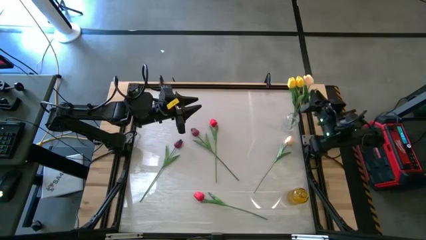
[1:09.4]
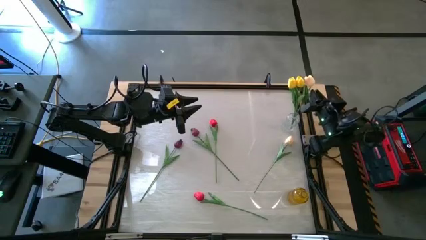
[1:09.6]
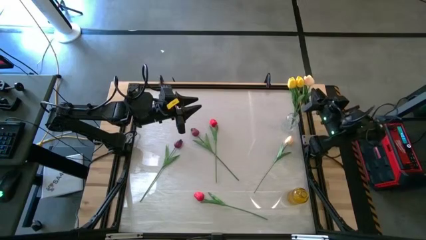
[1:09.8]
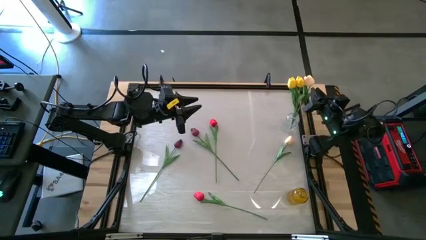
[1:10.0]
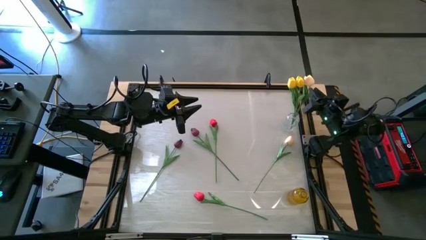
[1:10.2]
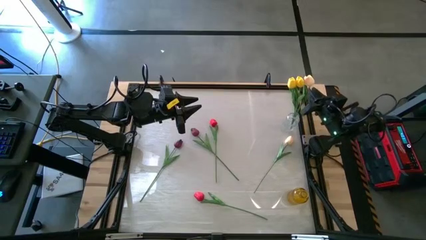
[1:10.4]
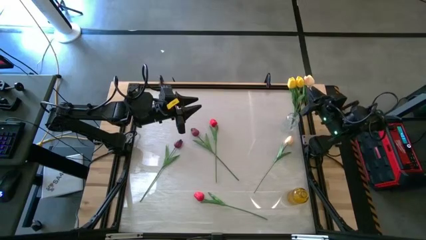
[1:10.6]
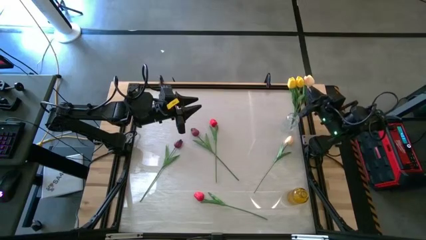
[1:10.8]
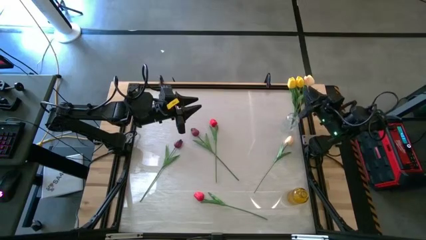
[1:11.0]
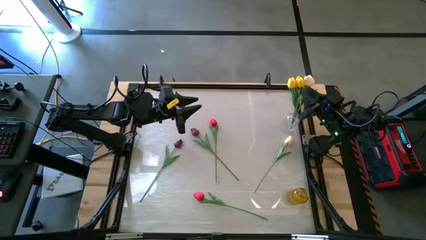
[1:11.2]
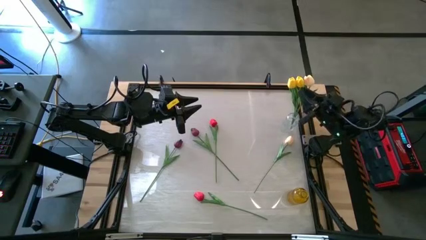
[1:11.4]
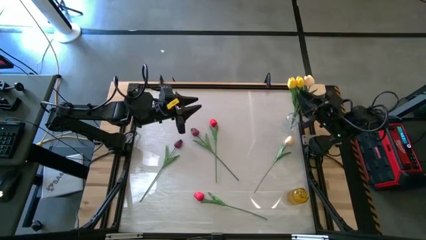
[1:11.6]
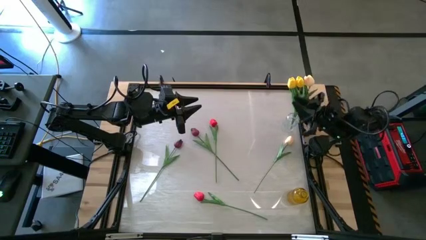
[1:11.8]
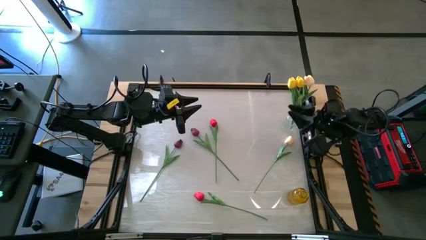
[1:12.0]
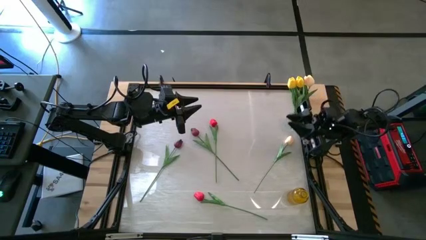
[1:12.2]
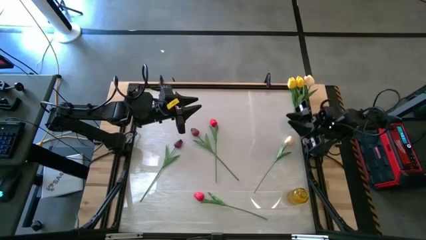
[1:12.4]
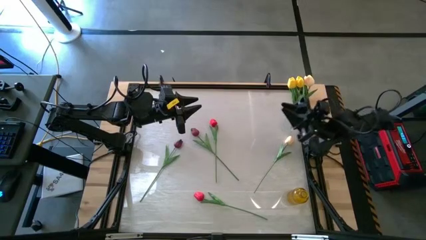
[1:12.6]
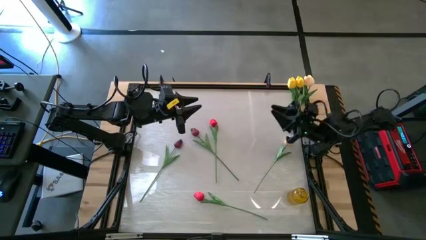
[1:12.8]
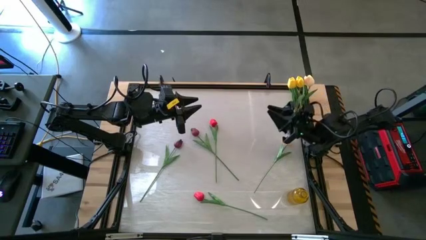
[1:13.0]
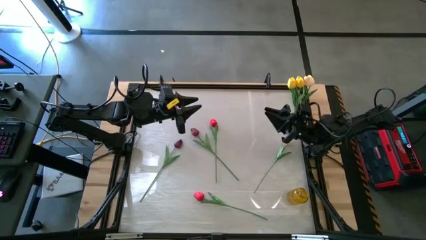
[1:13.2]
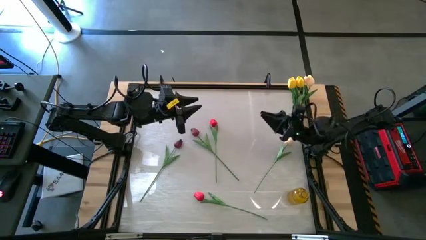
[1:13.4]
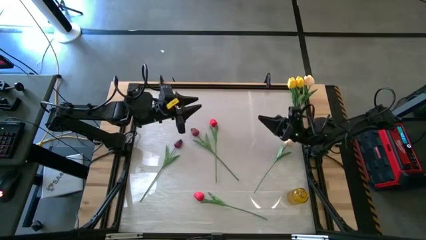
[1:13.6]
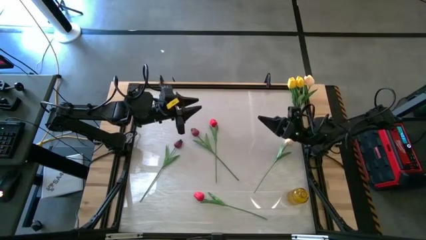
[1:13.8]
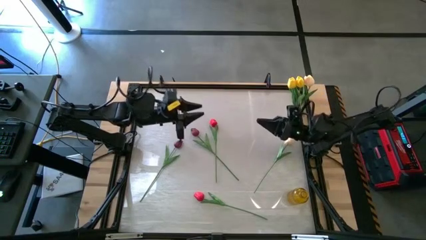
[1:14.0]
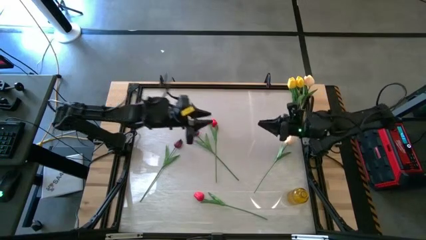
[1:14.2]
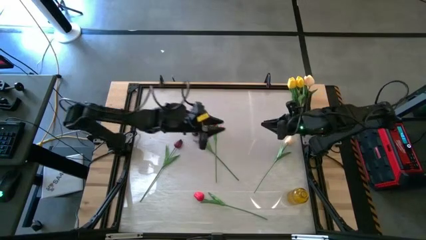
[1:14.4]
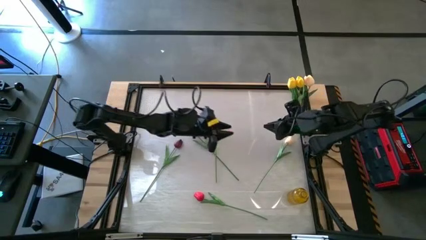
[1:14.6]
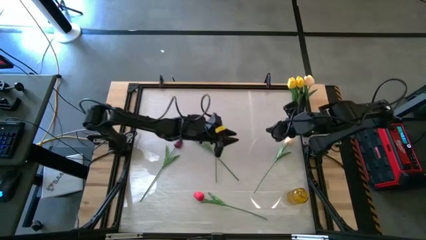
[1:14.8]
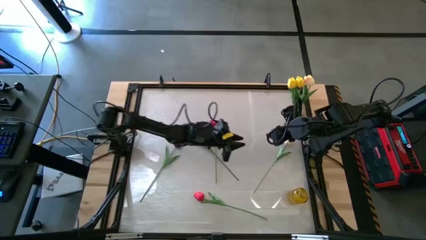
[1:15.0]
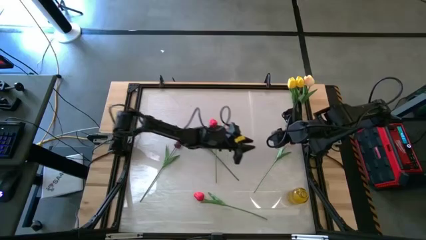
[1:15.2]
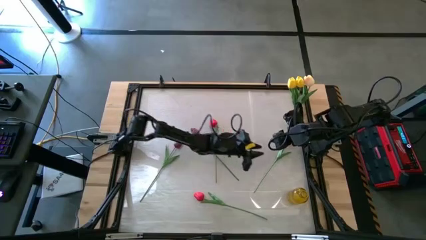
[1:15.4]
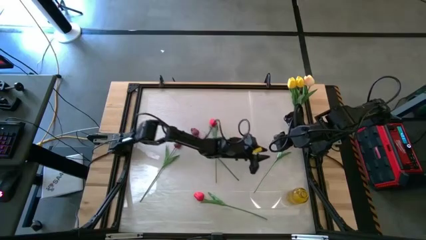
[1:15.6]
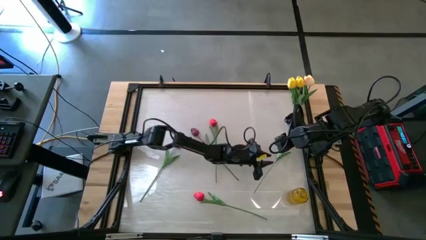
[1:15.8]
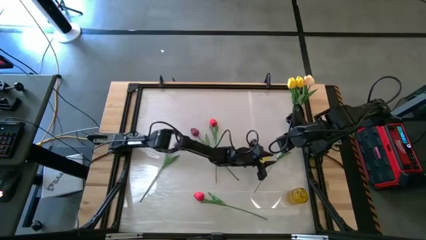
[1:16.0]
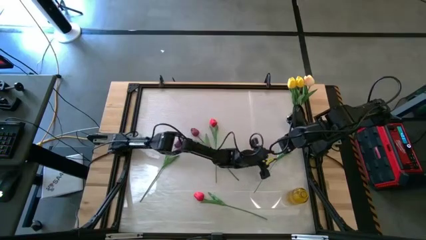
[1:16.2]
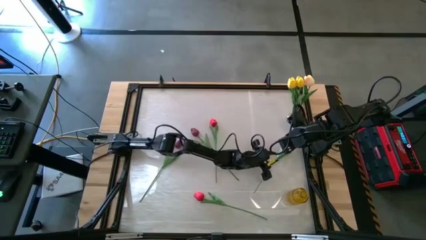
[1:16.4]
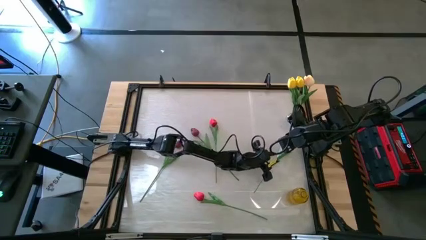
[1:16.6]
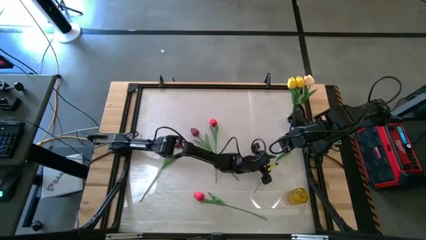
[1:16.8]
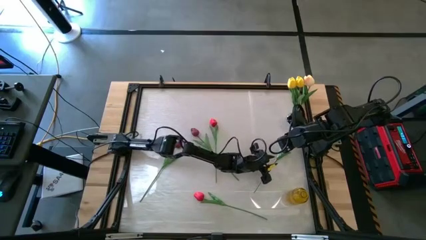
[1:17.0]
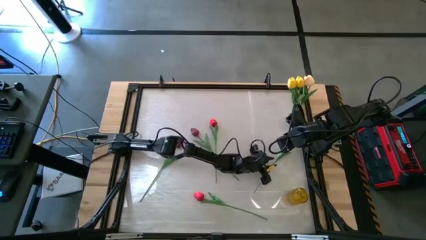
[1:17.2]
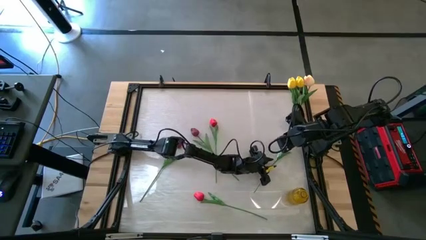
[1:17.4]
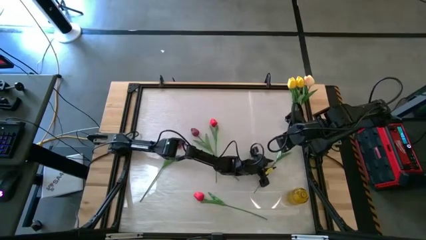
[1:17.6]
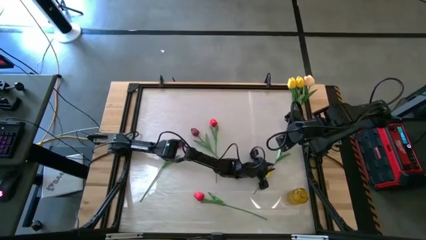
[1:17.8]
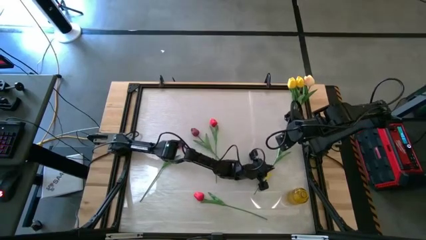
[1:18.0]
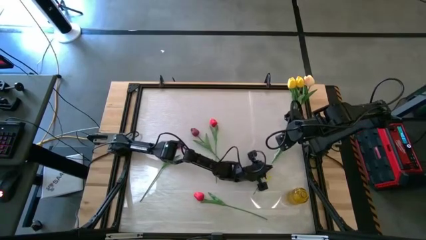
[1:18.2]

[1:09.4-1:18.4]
Task: Sort flowers into vase by color
Put the white tulip into the transparent vase

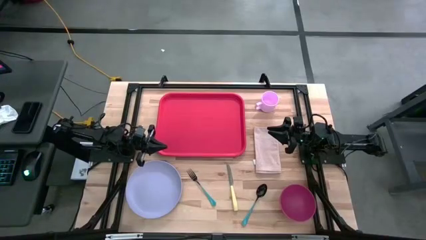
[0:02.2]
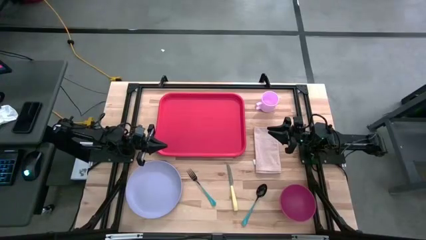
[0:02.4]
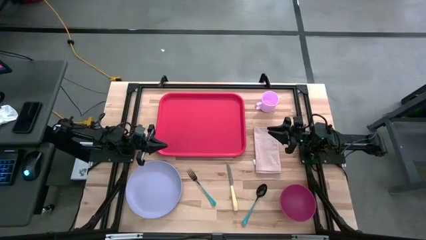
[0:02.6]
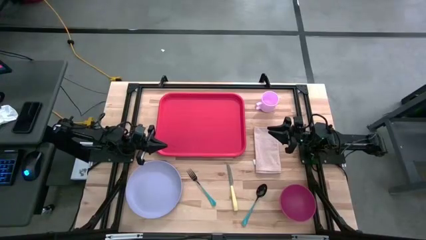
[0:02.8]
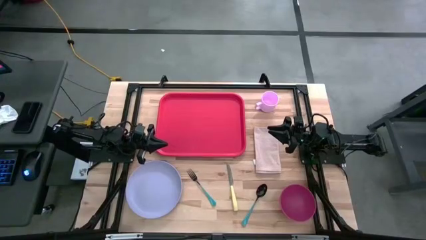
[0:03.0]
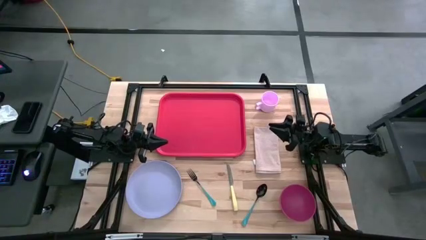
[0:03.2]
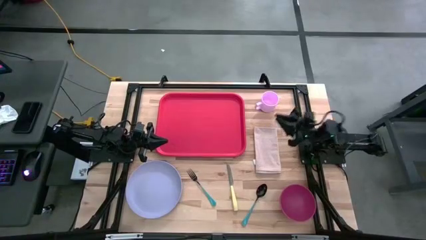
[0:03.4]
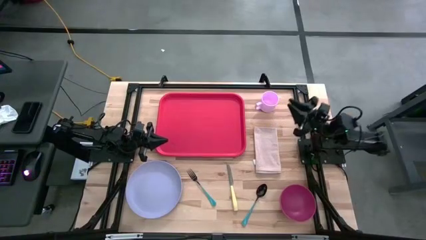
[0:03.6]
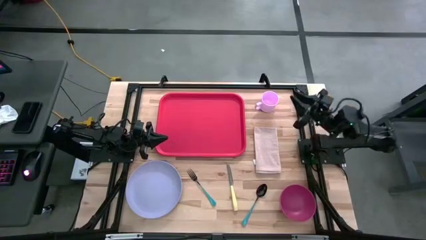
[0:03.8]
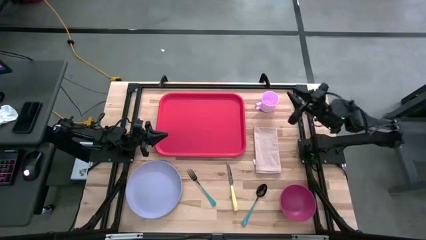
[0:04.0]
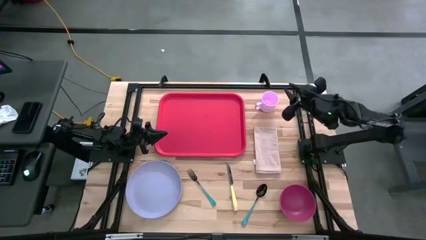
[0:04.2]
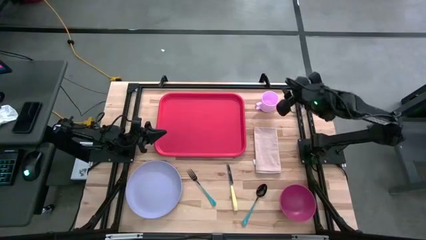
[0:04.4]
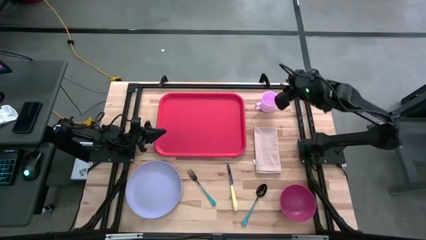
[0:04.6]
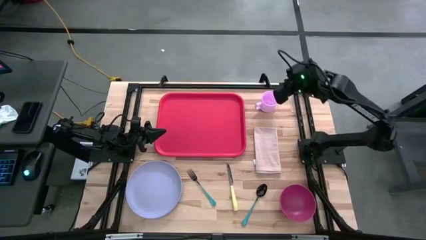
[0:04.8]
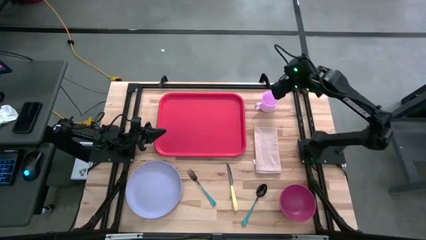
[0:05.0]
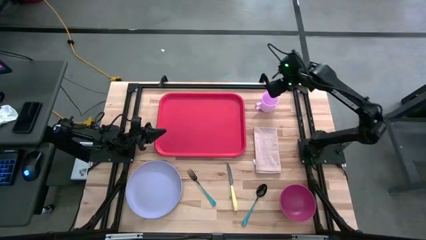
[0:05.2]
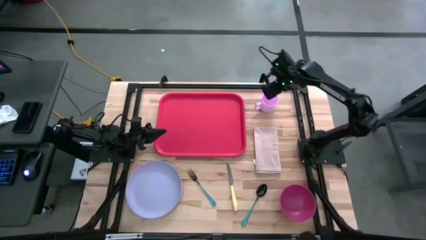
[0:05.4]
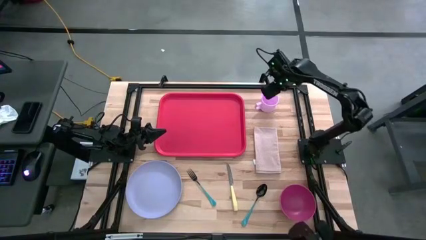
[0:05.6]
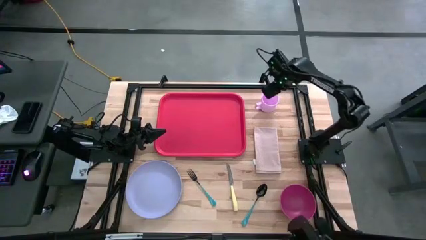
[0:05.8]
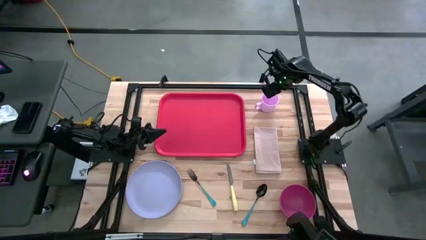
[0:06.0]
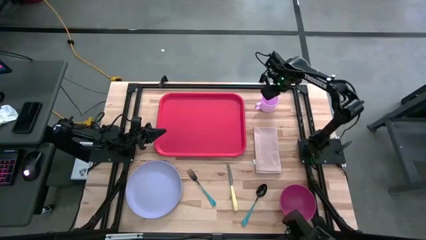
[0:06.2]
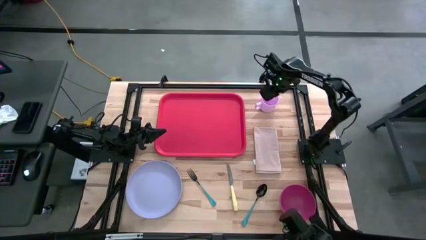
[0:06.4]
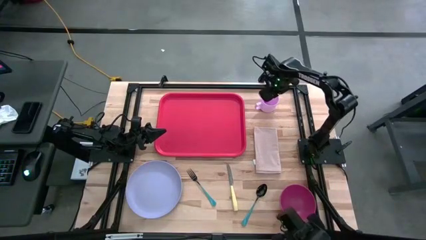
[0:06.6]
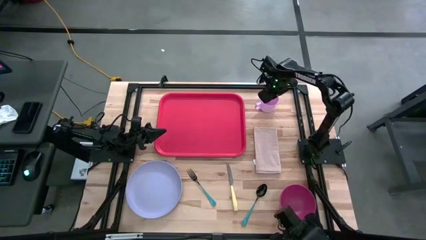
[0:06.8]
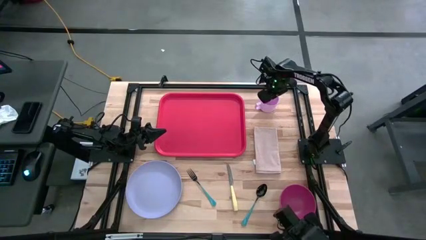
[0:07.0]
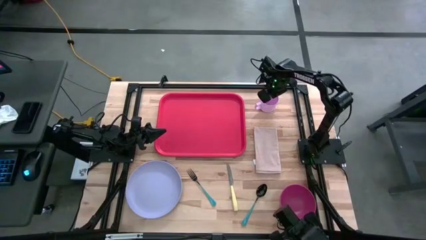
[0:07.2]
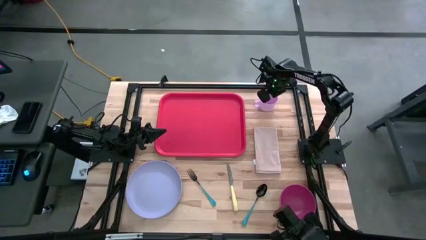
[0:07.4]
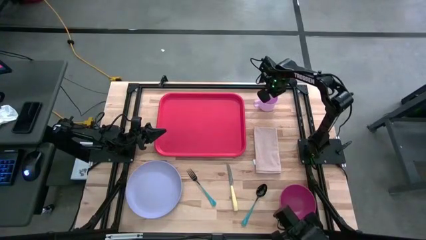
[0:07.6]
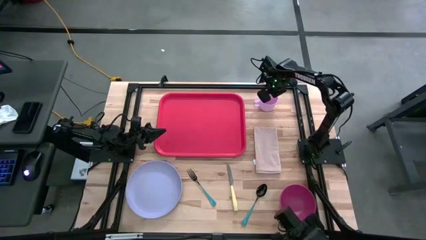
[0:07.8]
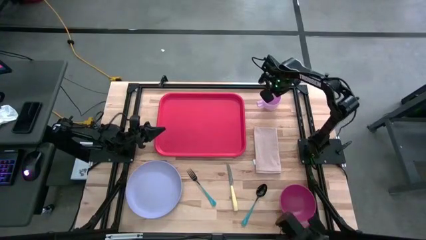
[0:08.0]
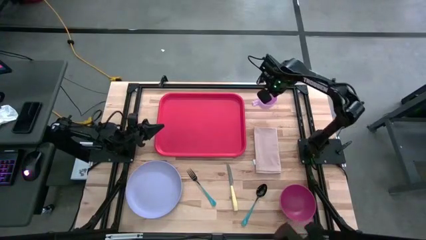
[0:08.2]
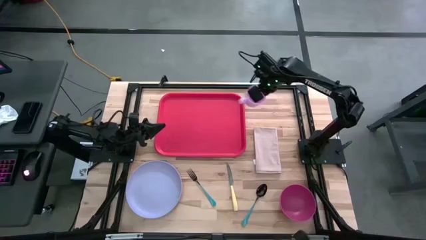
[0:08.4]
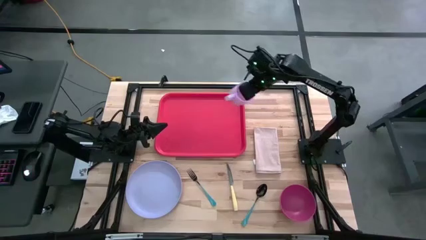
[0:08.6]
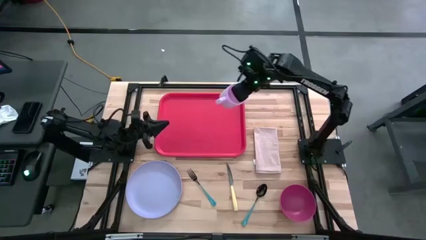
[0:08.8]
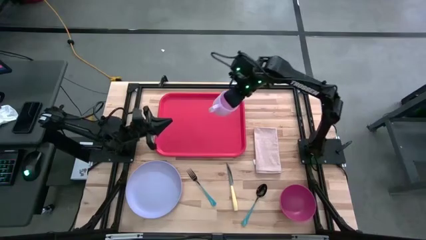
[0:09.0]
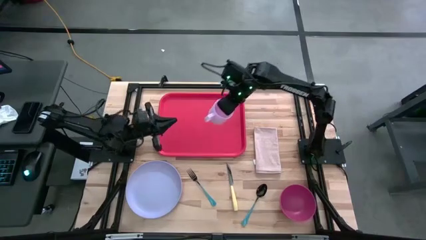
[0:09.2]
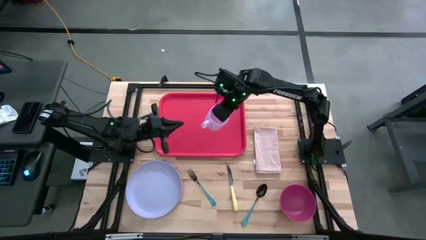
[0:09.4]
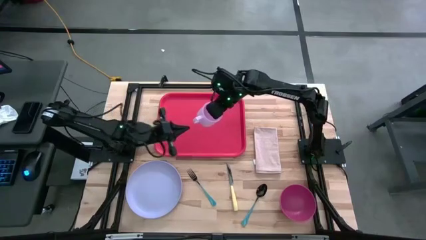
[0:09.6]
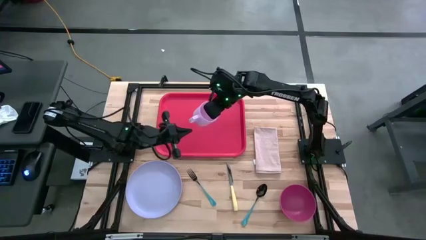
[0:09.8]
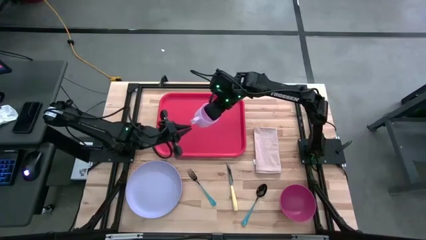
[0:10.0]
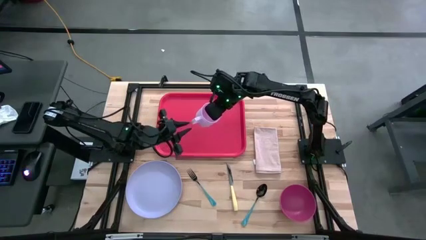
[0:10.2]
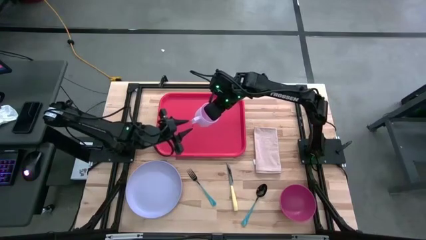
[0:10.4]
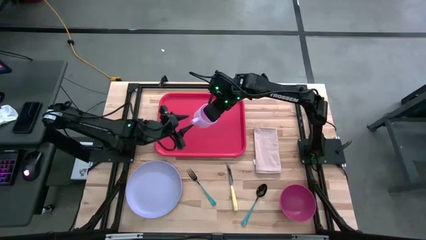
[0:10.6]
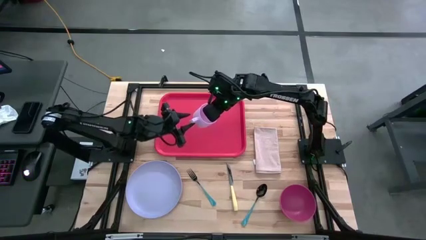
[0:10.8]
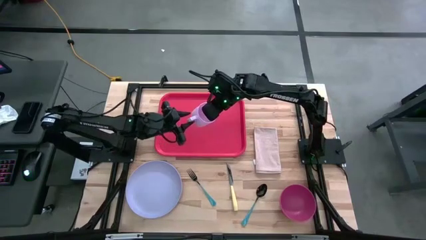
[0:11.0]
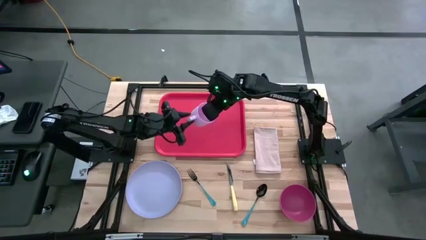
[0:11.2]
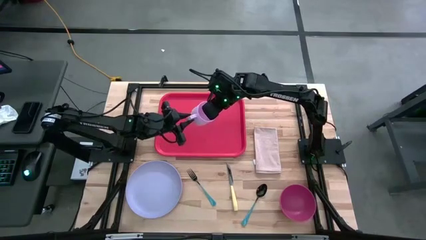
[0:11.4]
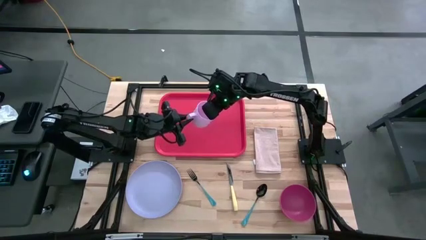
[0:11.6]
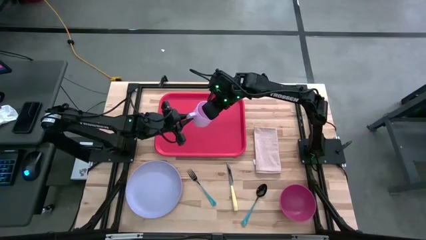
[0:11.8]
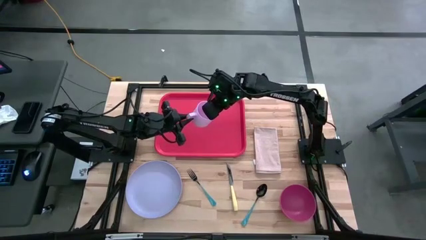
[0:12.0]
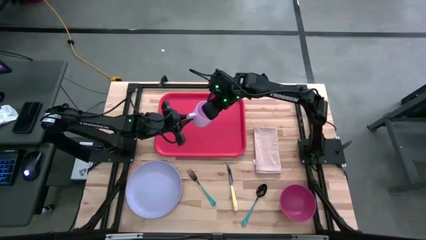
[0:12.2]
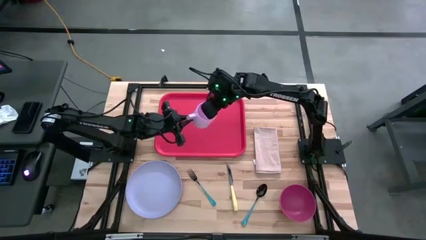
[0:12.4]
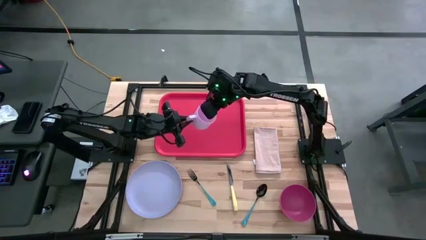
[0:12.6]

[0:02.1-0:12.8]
Task: Set up tray
Put the pink mug on the top left of the red serving tray
